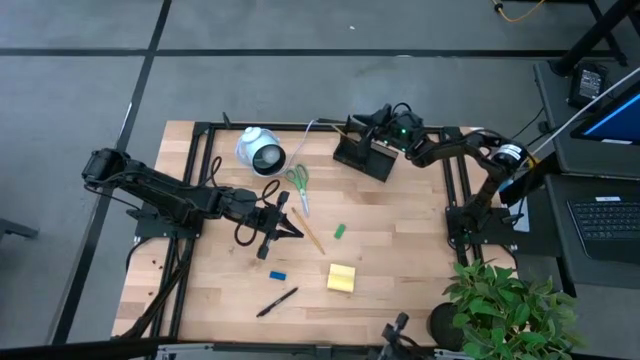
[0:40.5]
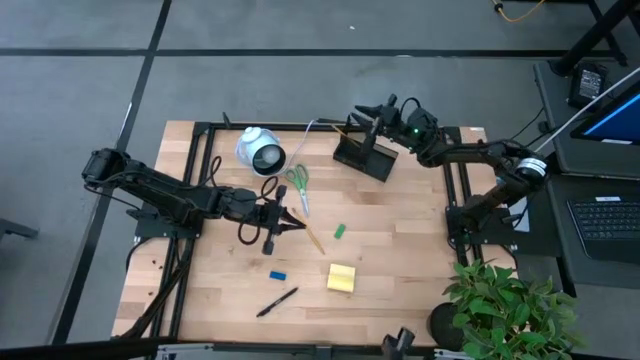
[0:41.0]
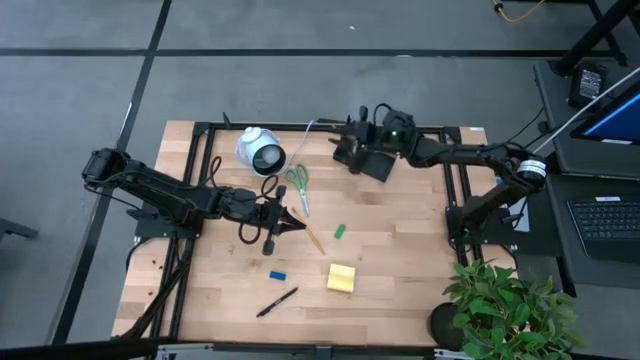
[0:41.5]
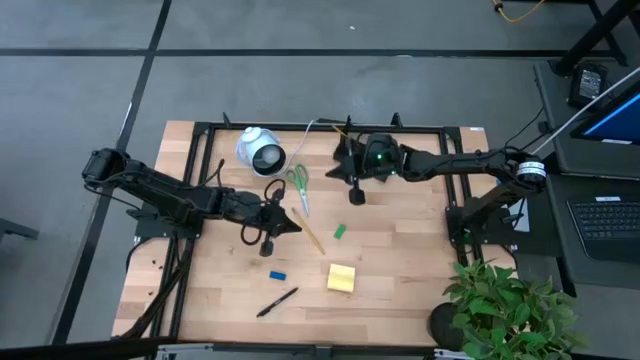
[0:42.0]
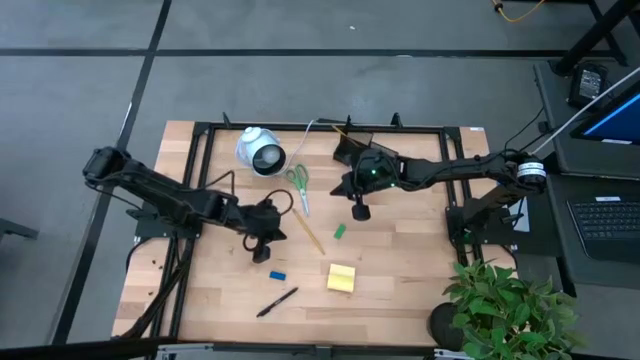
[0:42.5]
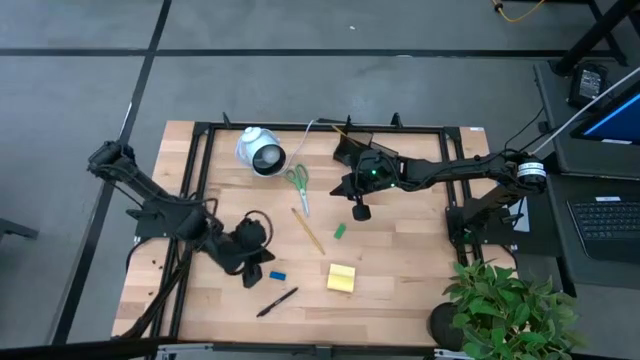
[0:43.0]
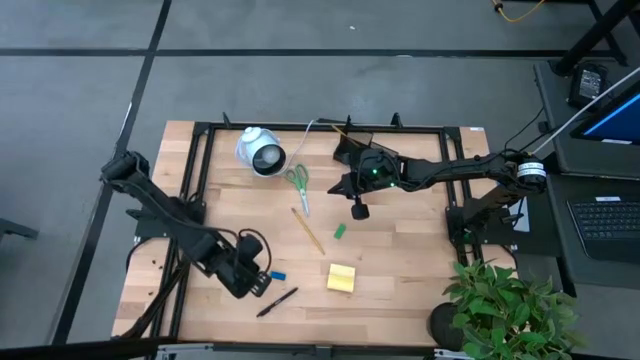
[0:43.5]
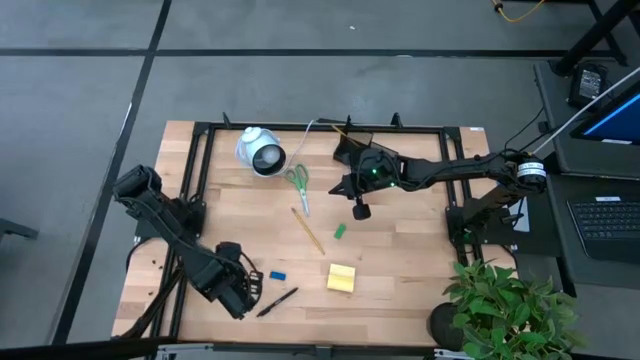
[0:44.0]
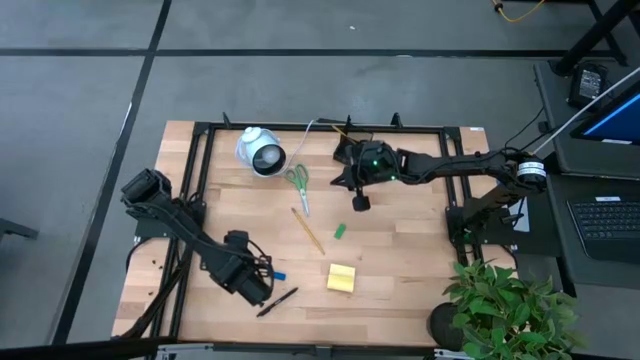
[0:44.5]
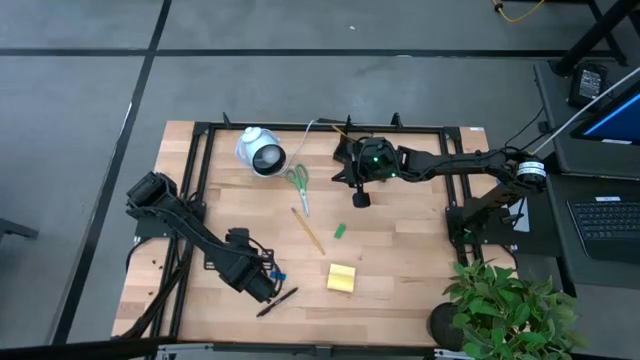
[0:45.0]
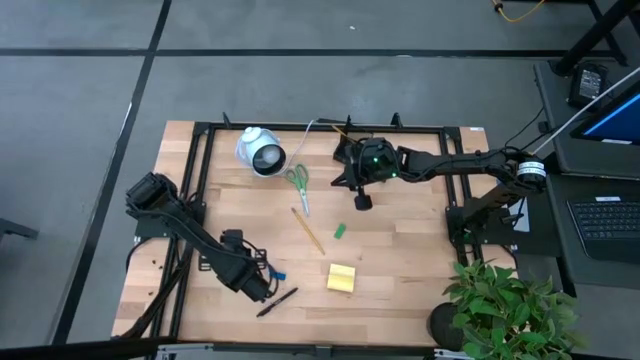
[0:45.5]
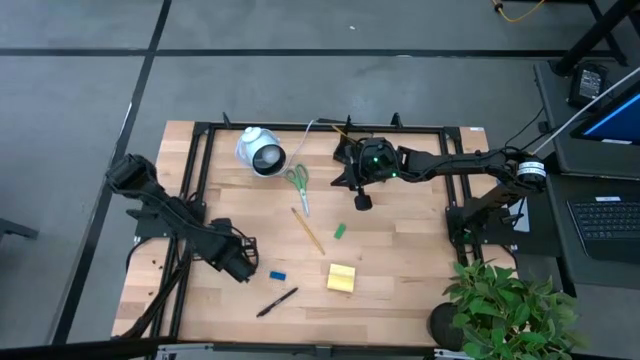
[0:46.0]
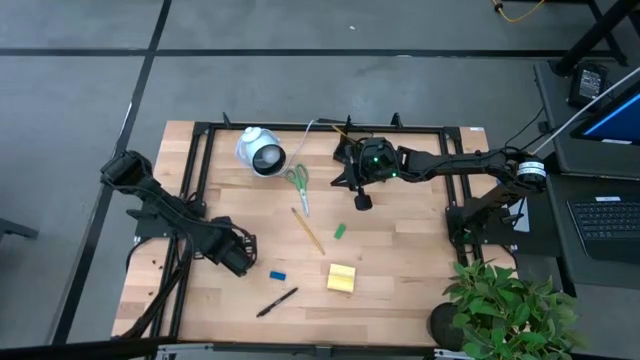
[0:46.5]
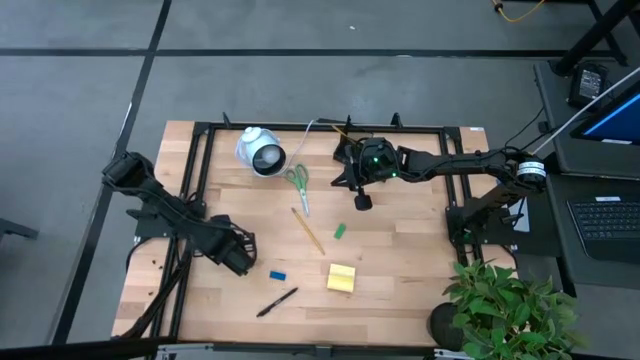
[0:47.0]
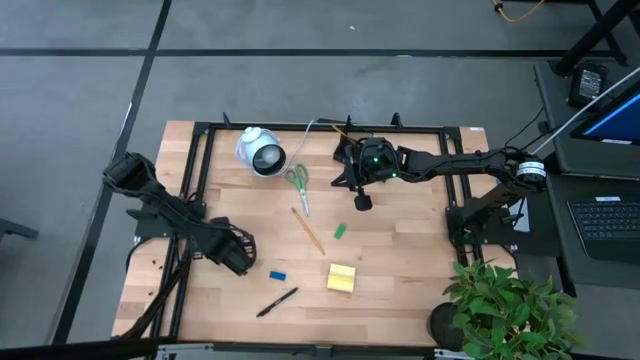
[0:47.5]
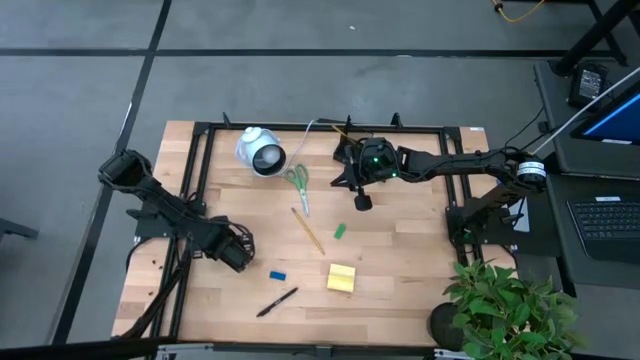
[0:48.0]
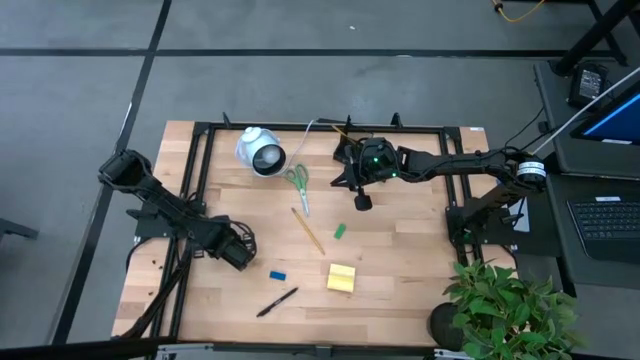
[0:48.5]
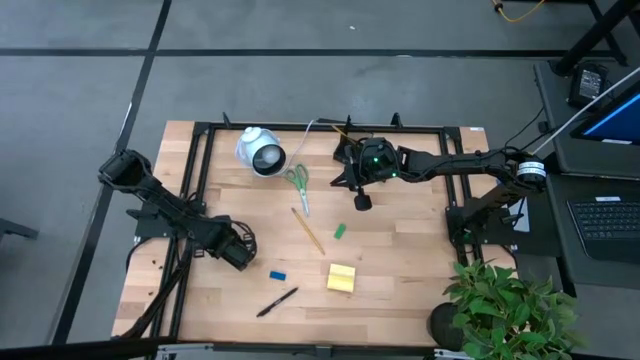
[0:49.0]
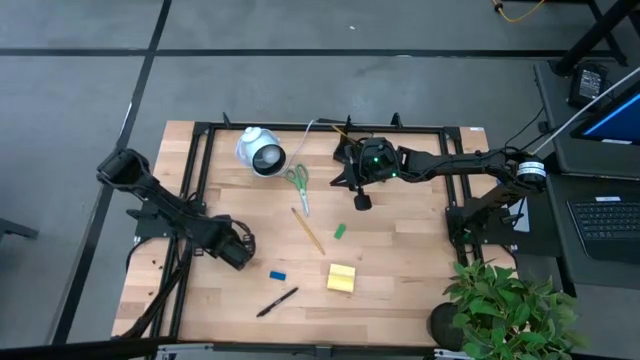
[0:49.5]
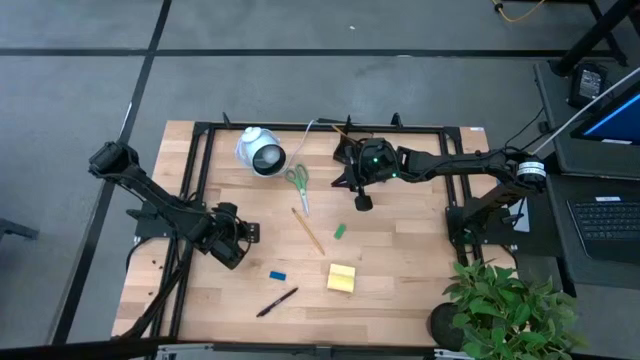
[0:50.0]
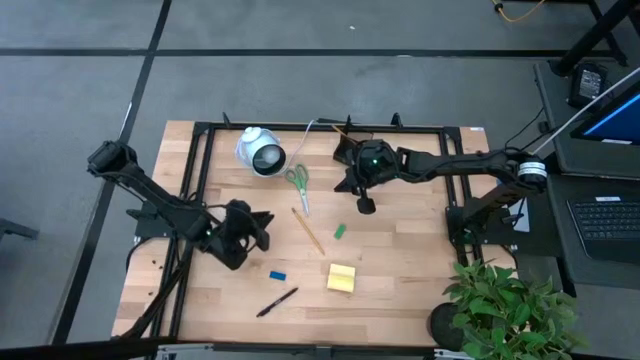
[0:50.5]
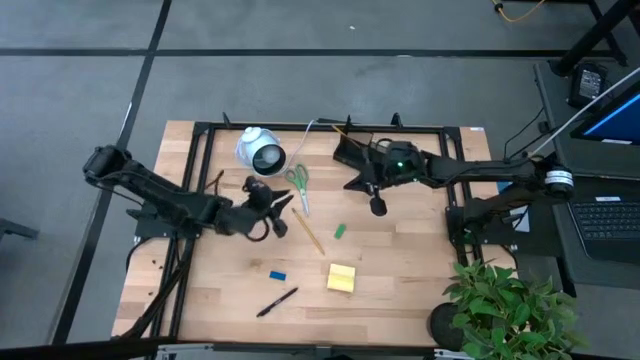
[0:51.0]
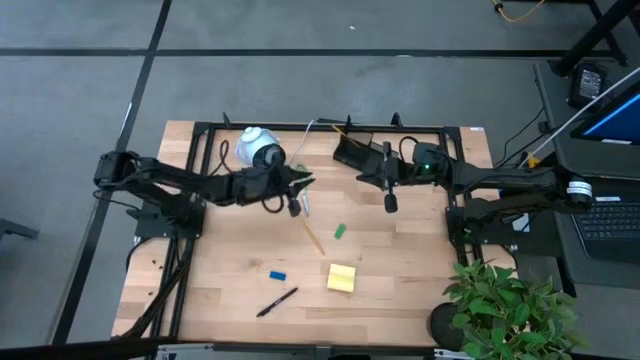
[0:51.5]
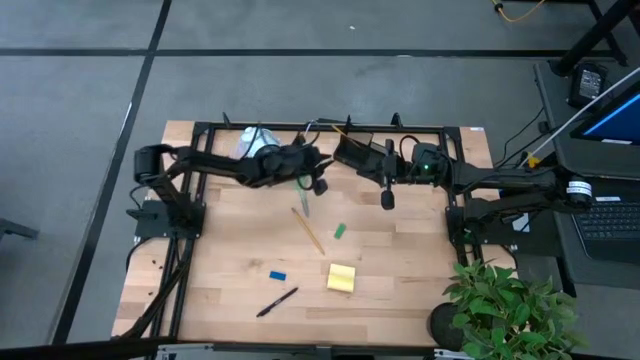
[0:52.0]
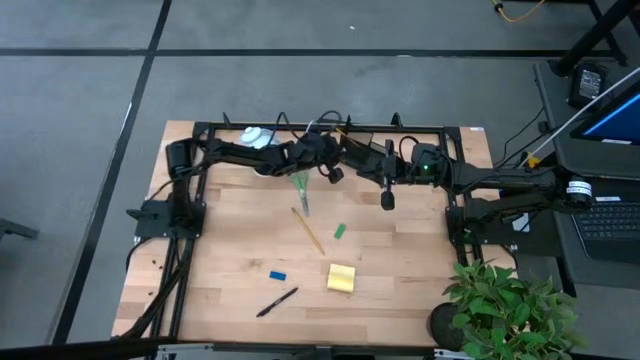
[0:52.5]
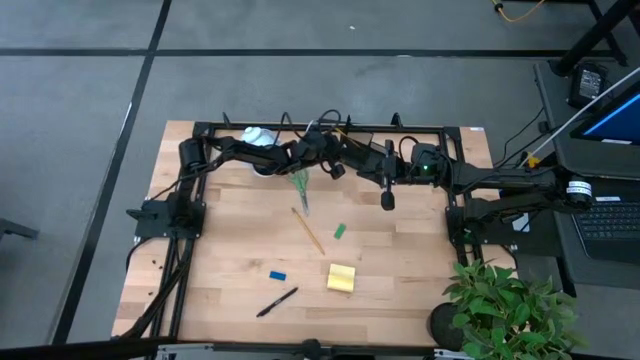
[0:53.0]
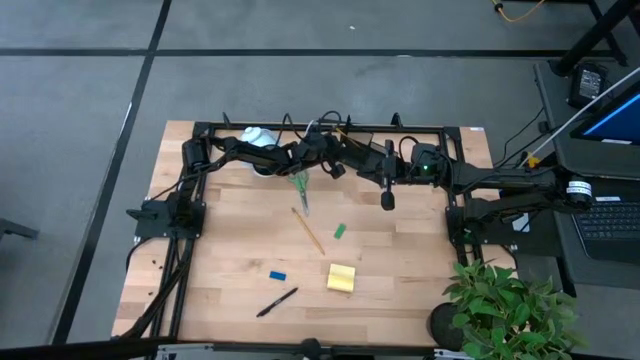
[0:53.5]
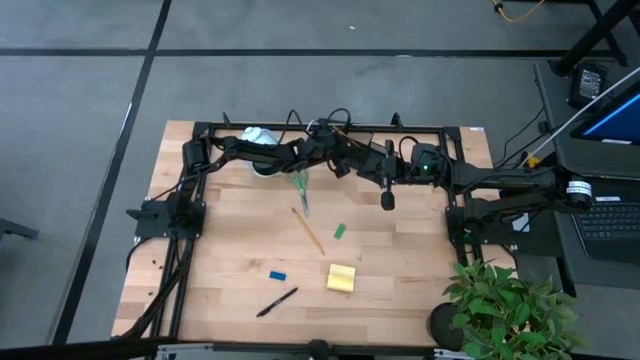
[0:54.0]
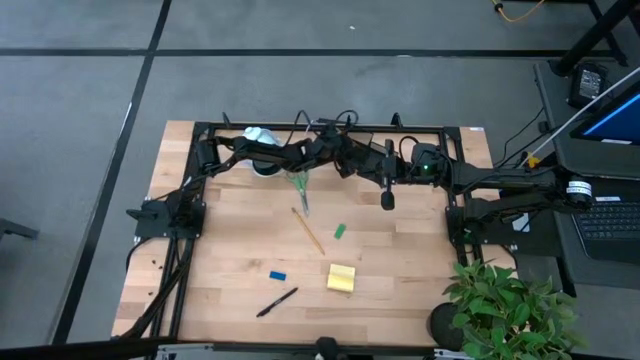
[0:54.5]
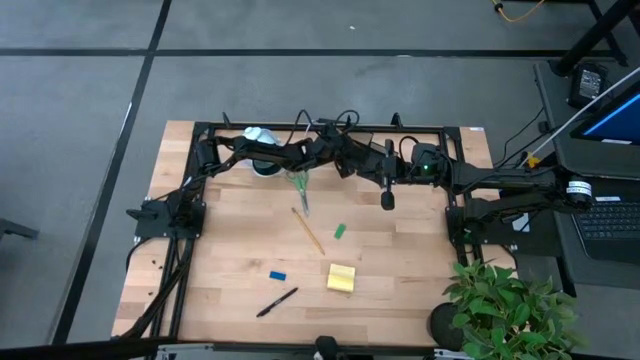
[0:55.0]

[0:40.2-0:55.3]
Task: Pick and place office supplies into organizer
Put the brown binder clip into the desk organizer

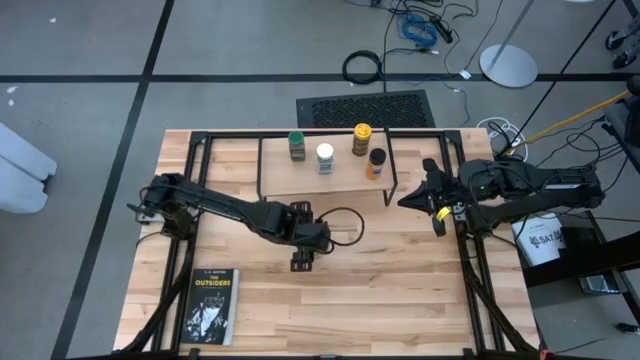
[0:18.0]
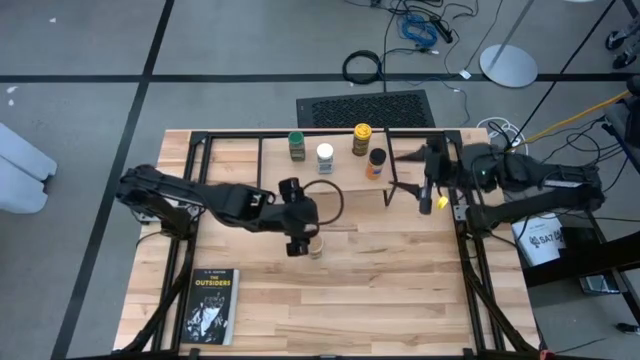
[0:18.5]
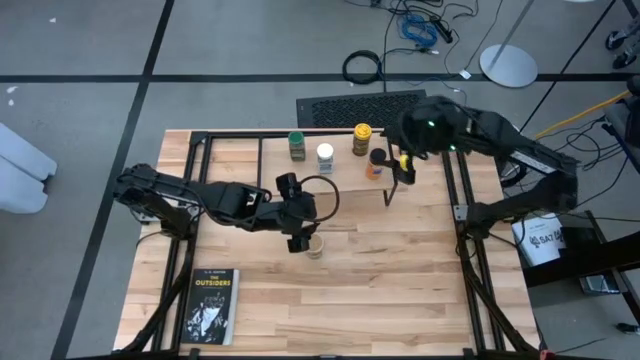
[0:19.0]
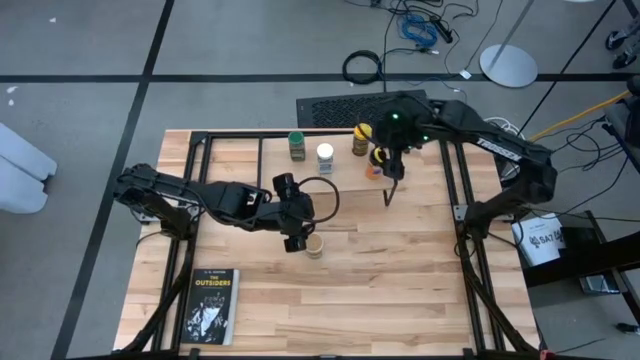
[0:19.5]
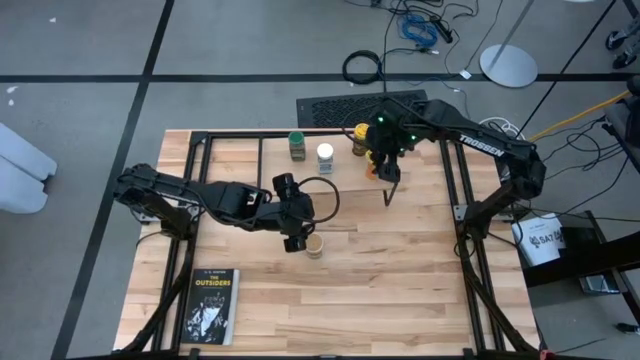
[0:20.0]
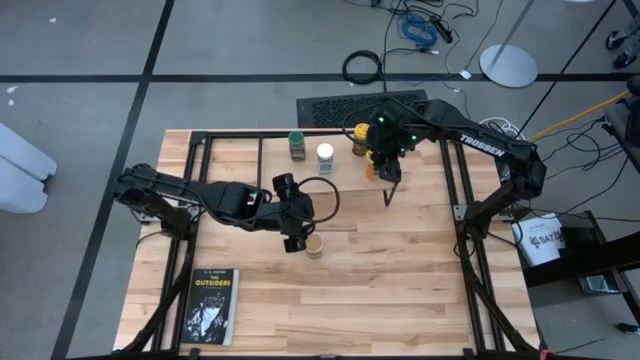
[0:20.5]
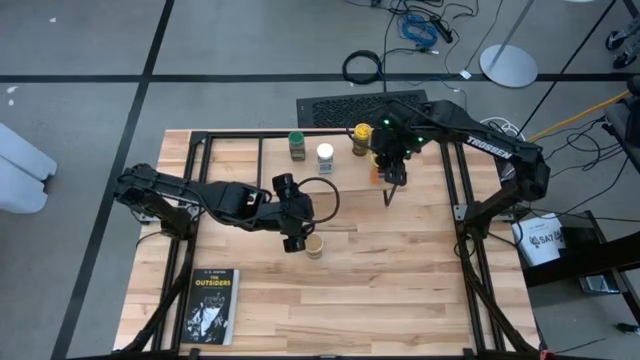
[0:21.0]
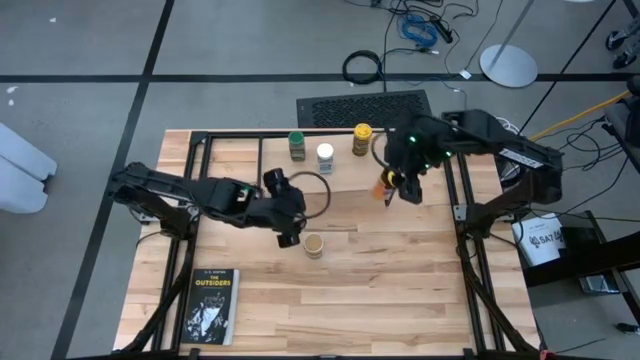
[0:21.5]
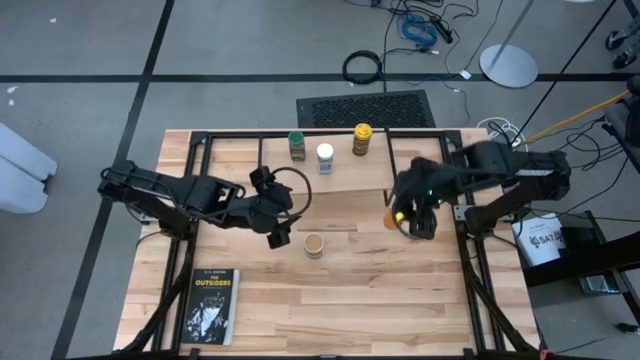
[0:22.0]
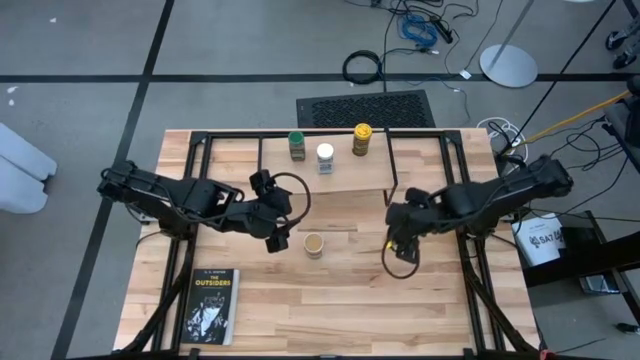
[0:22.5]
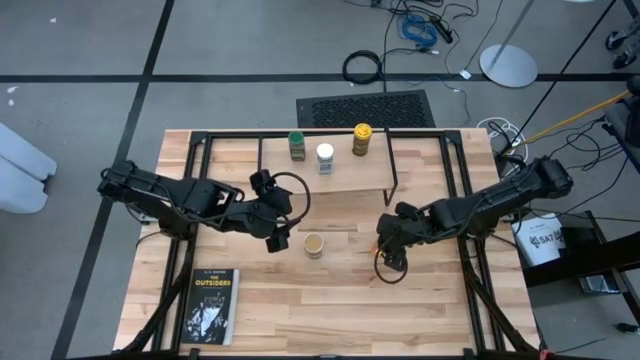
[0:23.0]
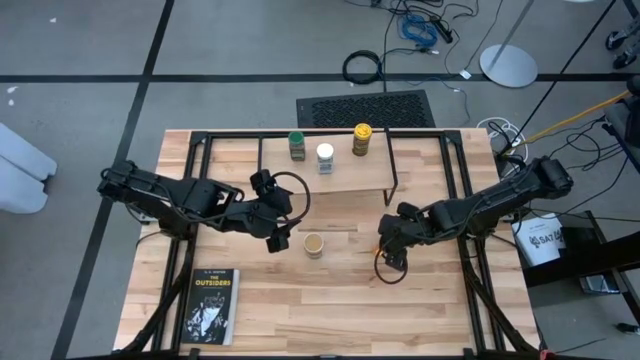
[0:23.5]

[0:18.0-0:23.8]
Task: Shelf spices
Remove the black orange seasoning bottle from the shelf
